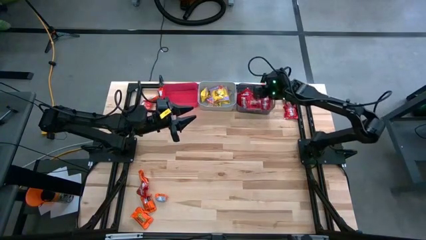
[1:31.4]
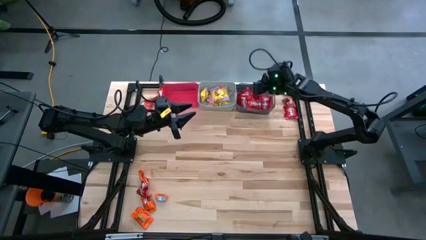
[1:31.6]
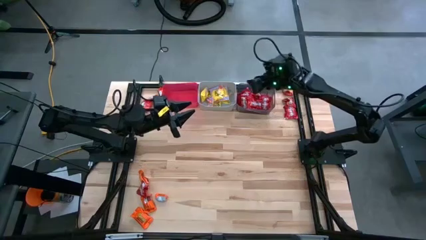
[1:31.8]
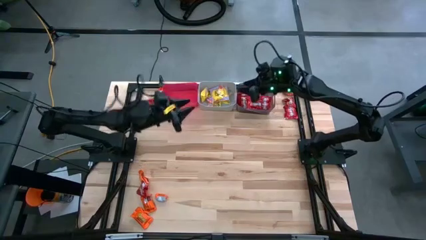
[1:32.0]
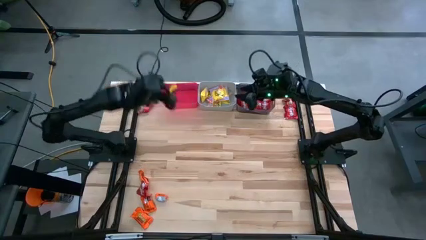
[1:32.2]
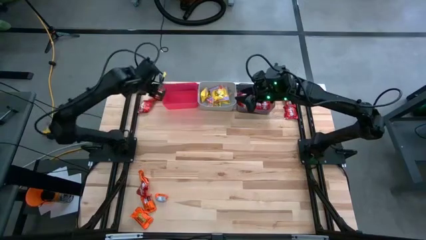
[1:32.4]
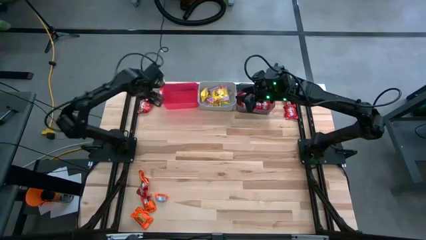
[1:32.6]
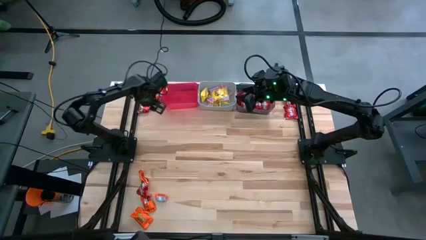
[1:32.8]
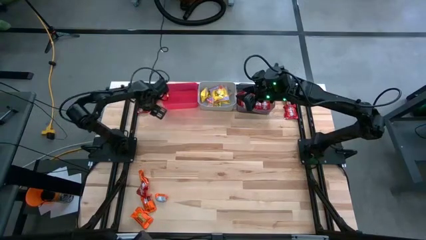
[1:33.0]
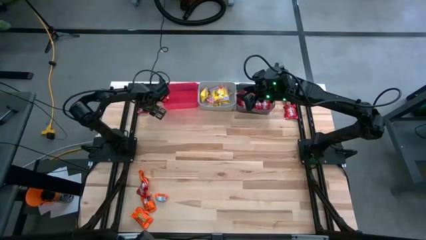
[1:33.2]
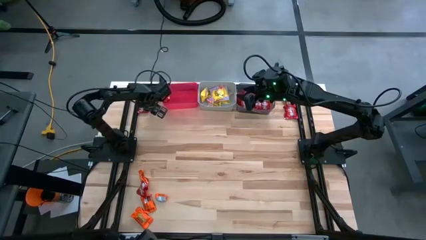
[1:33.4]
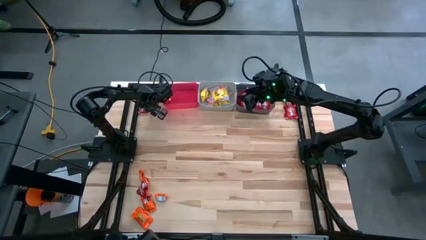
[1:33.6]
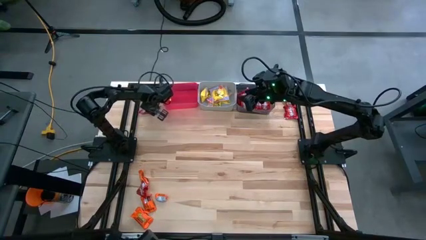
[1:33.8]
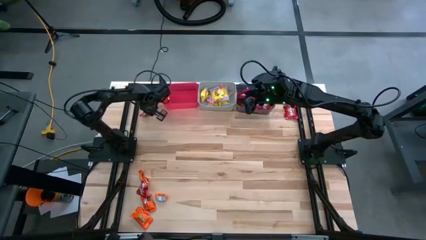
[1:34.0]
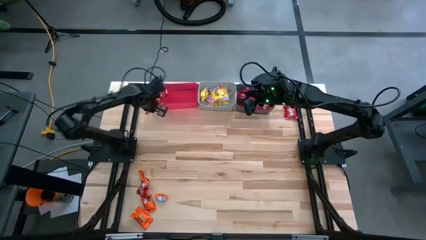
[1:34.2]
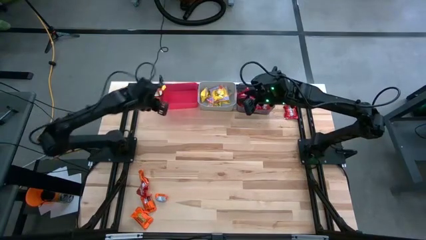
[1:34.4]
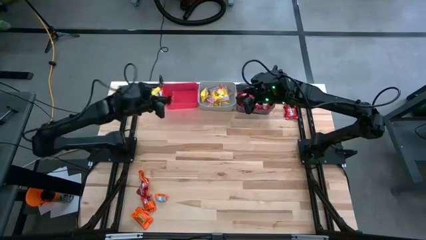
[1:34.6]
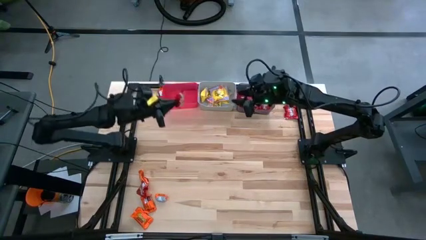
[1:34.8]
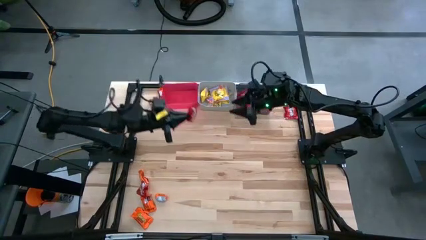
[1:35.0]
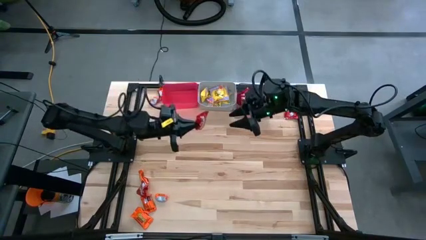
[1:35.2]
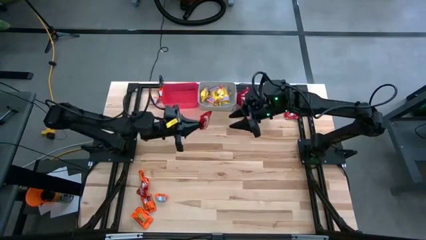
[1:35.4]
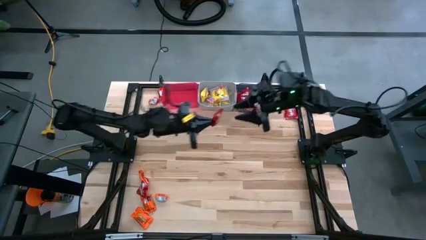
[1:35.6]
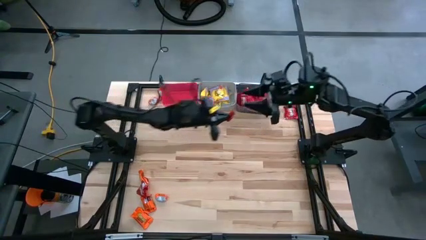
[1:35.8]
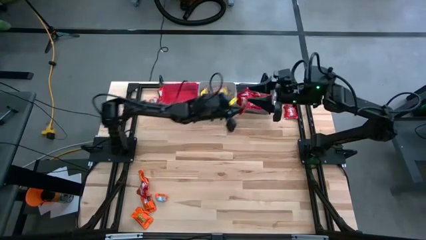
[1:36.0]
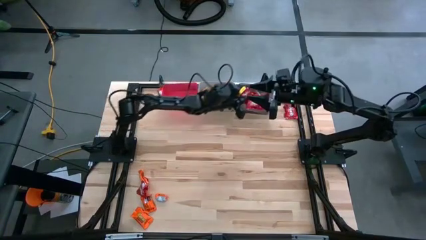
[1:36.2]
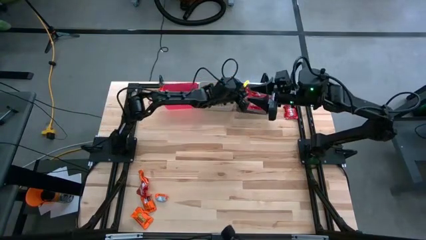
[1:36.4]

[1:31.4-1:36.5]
Task: Sort candy
Put the red candy into the black bin

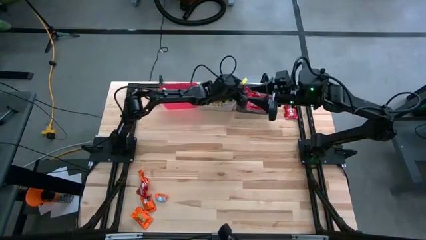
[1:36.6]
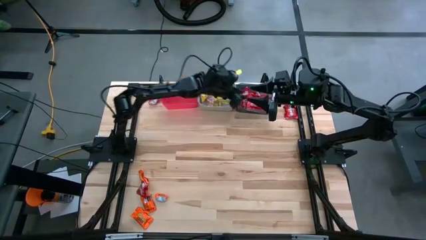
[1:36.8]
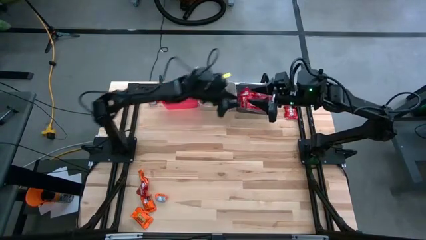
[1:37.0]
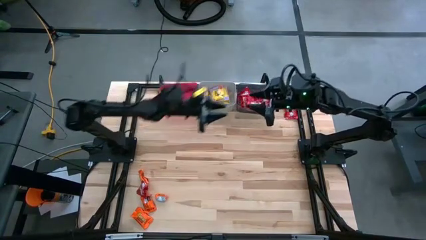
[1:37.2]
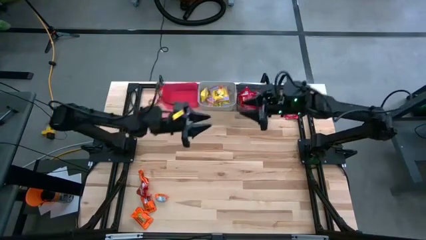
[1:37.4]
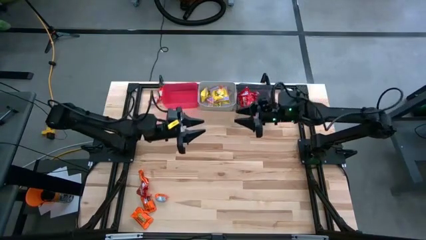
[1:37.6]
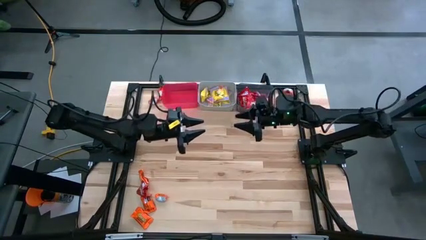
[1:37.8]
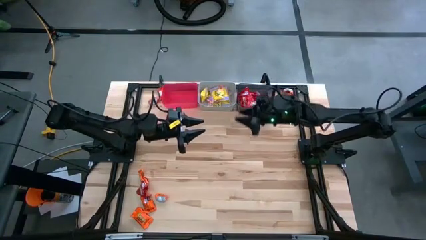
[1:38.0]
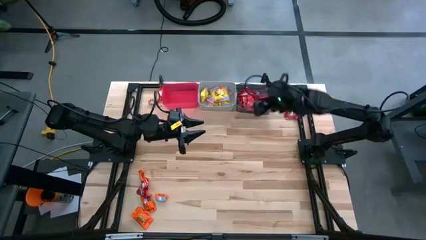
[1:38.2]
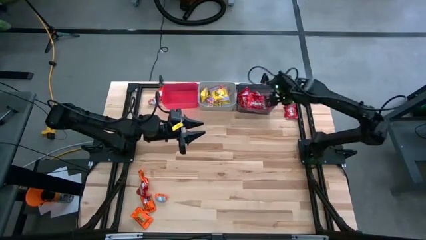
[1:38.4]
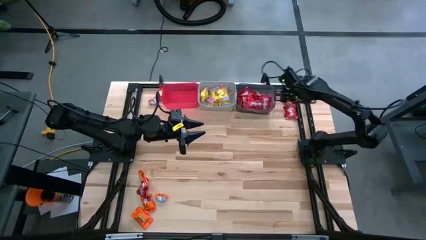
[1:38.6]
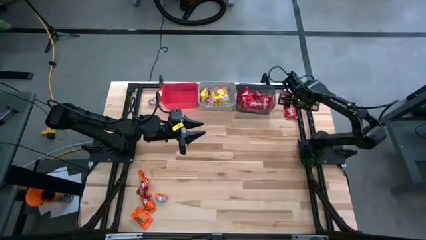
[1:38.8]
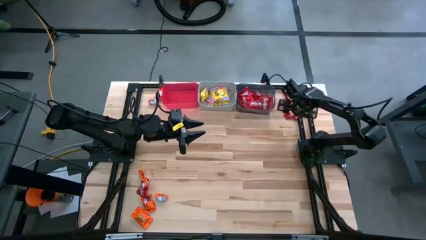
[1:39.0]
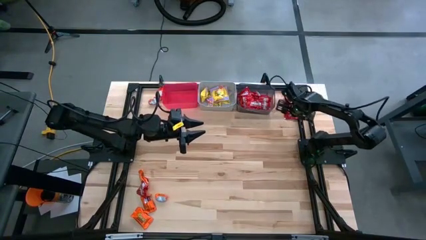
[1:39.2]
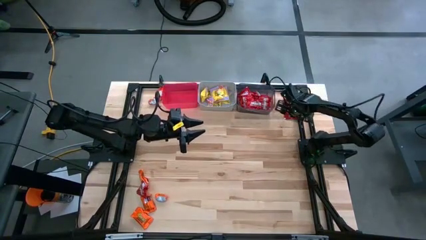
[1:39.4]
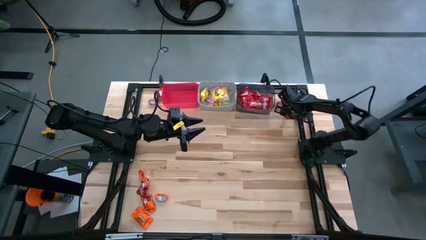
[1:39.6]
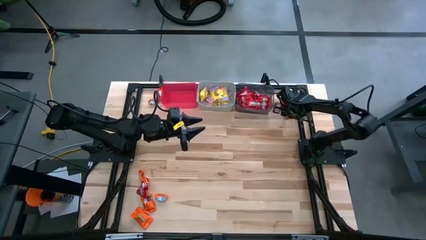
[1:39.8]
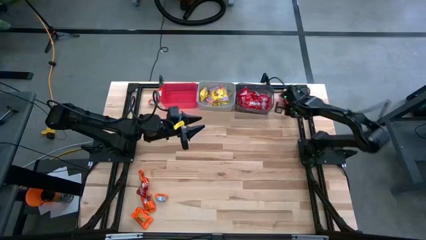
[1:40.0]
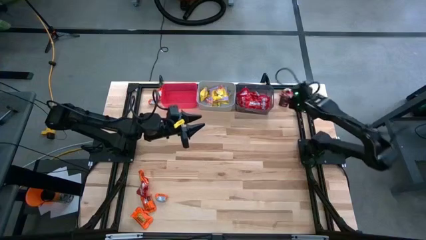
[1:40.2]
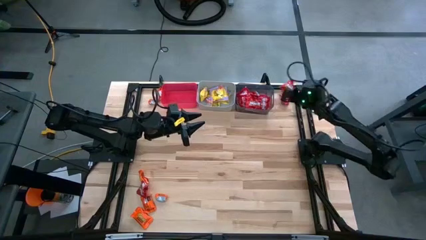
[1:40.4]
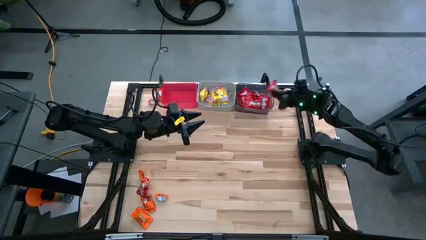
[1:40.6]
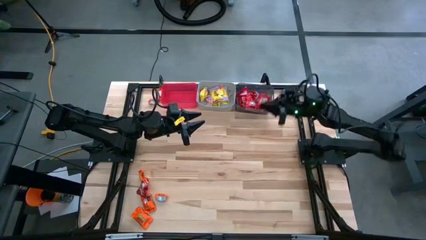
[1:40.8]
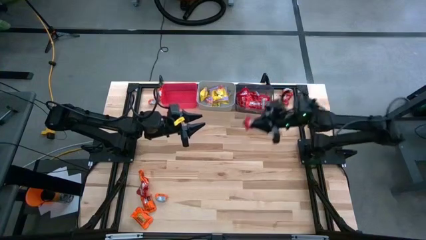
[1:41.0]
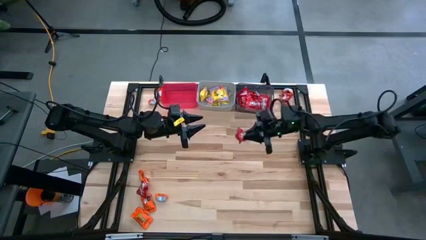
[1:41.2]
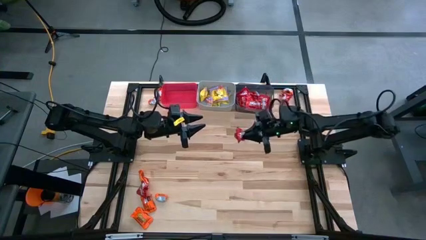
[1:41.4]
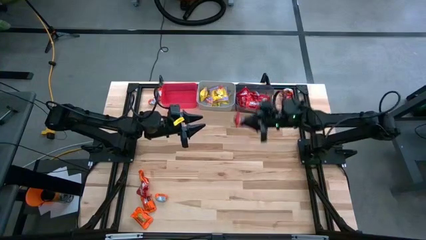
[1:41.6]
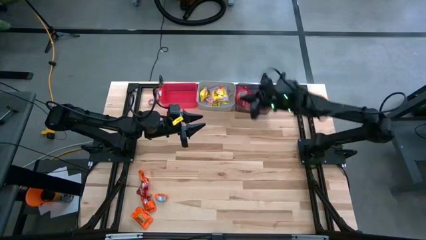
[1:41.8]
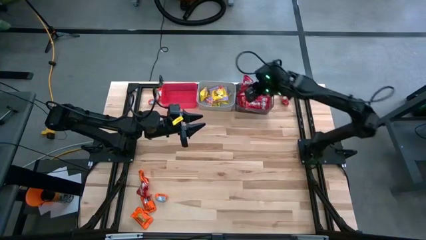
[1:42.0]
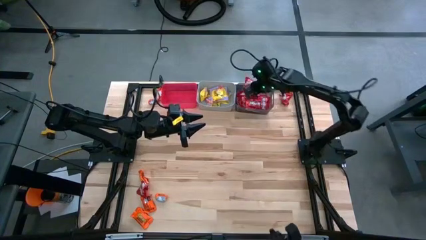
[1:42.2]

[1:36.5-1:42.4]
Put the red candy into the black bin

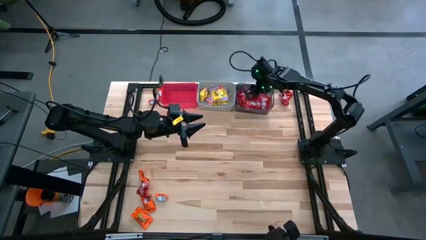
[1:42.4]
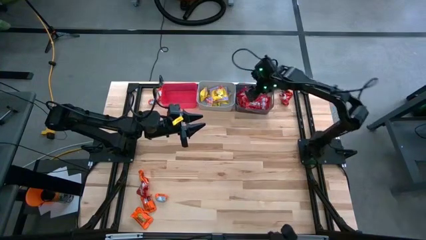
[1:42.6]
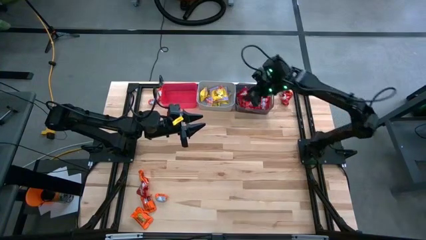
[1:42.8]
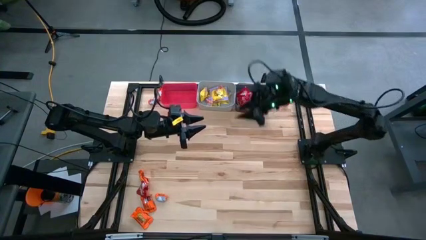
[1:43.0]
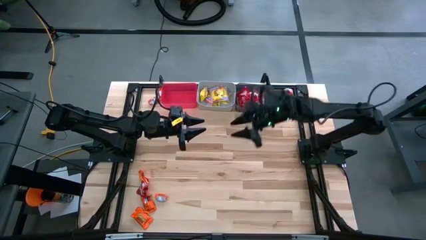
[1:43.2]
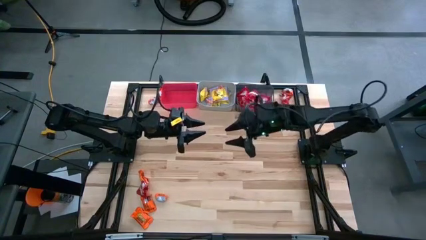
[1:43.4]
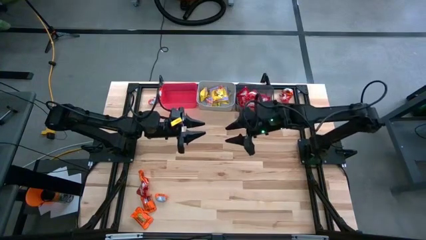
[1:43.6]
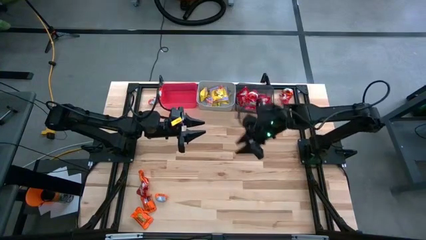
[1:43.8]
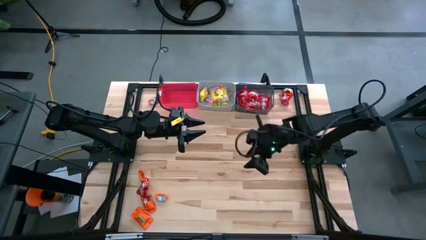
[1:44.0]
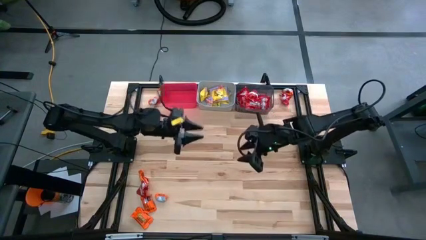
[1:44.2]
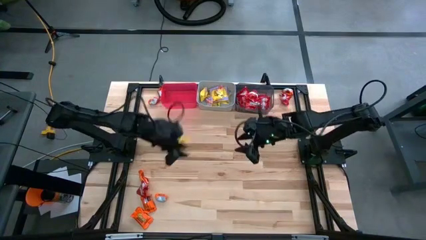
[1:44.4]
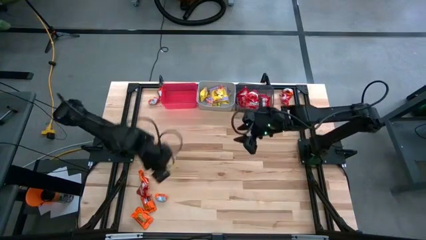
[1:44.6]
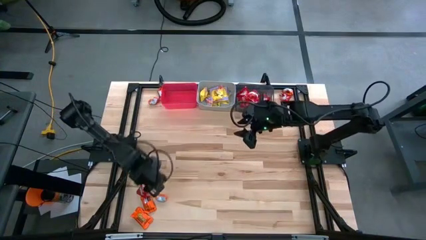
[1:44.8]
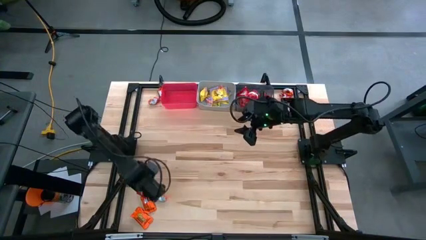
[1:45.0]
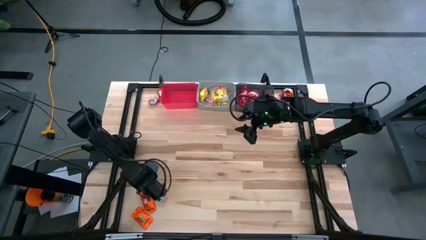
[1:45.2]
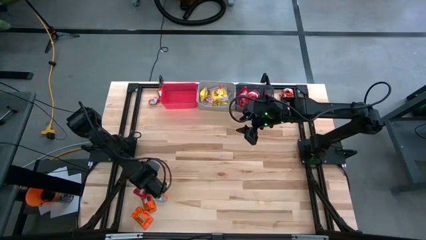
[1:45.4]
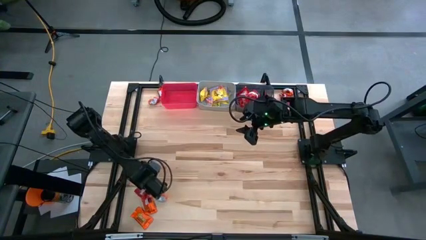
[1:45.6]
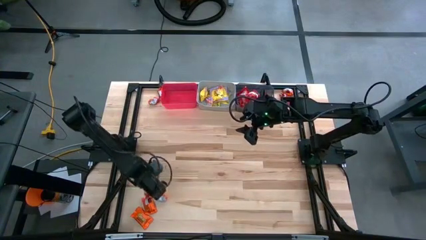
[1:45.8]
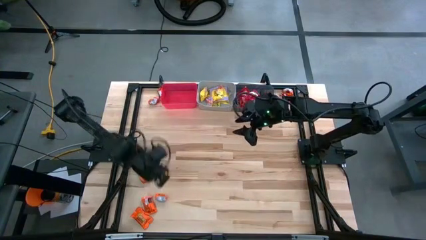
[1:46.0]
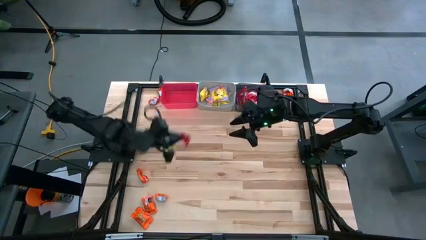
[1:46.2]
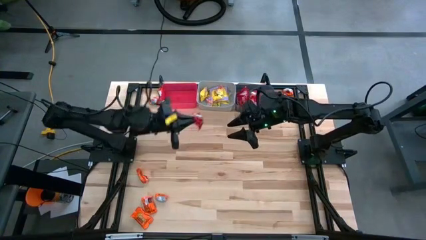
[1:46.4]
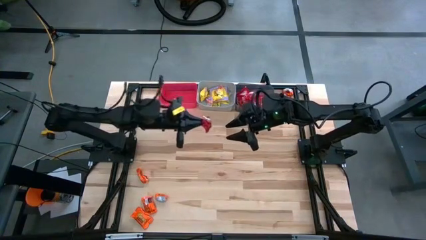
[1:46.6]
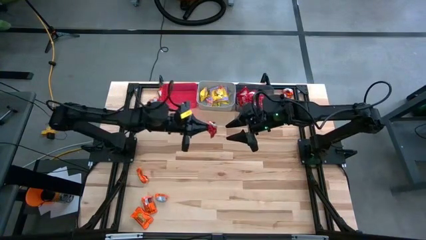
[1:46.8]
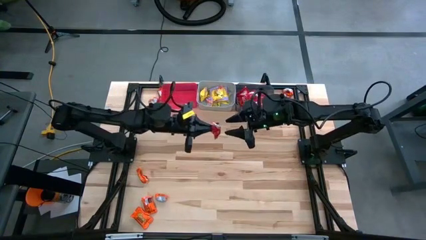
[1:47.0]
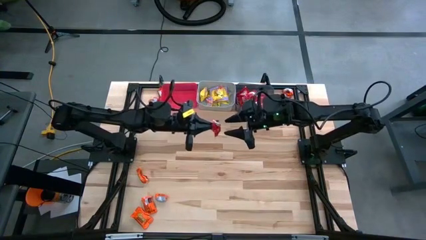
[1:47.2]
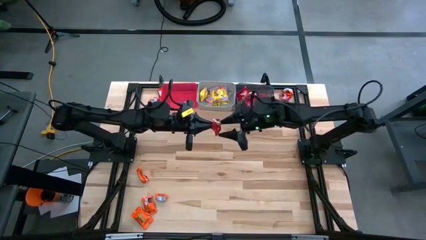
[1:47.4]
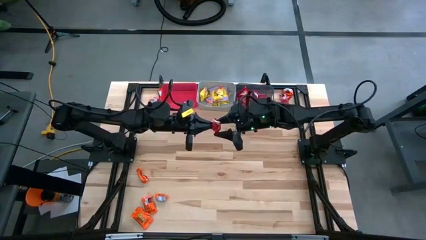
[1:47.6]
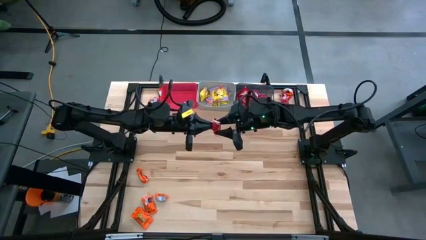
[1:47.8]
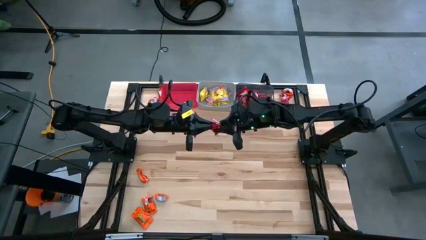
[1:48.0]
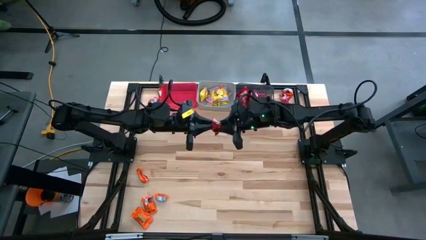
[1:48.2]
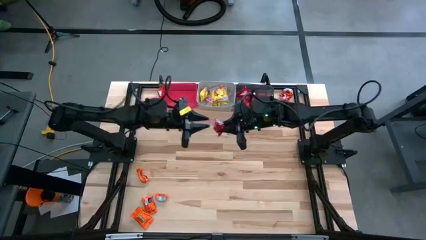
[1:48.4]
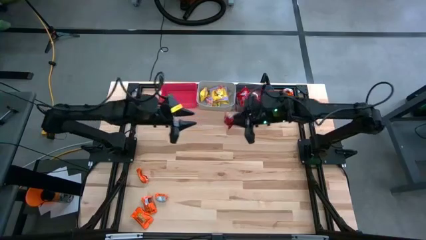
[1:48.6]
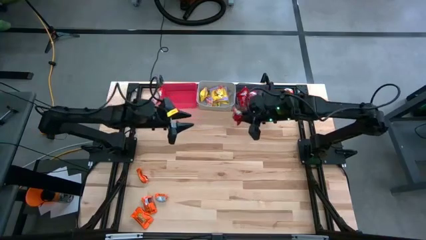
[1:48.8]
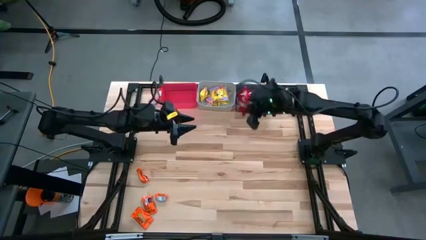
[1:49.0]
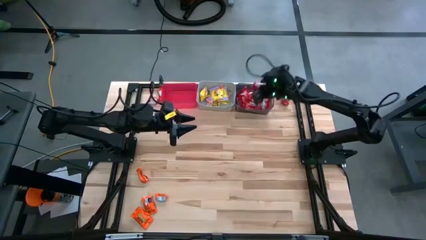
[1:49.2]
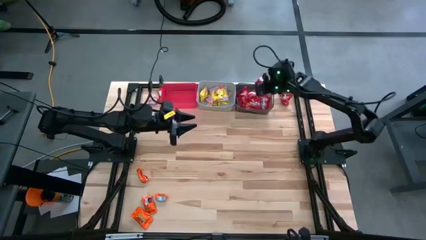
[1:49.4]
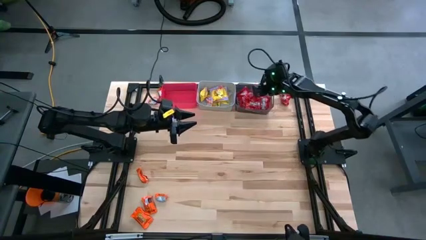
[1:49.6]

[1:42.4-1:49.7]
Put the red candy into the black bin
